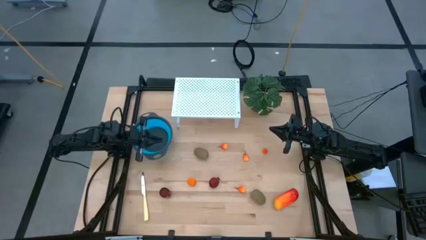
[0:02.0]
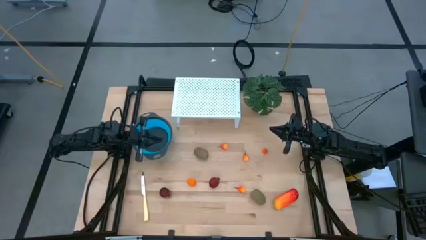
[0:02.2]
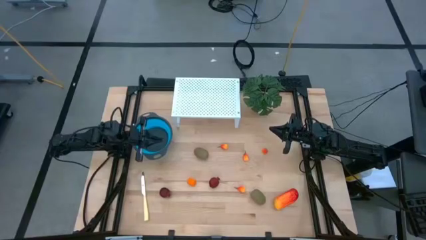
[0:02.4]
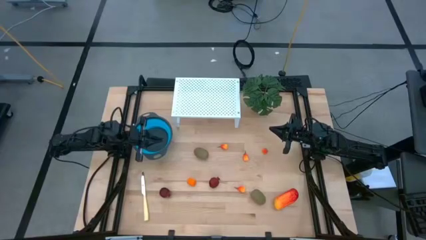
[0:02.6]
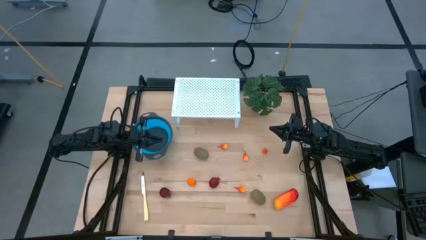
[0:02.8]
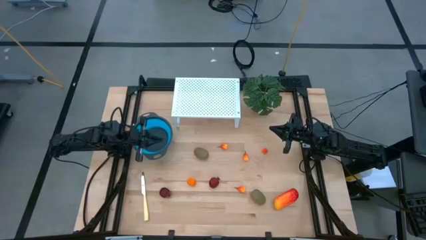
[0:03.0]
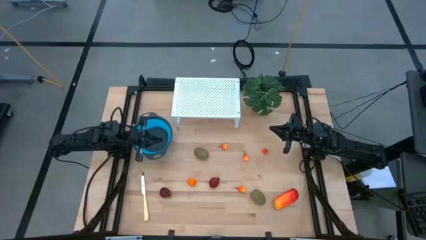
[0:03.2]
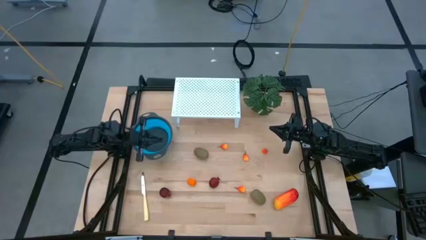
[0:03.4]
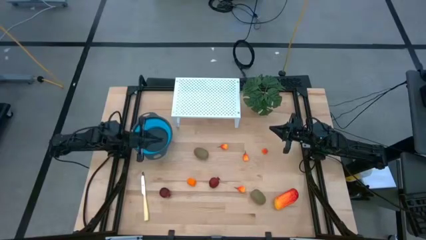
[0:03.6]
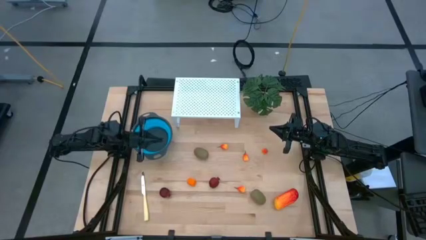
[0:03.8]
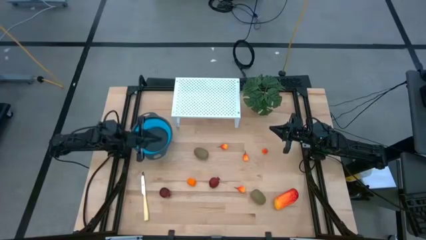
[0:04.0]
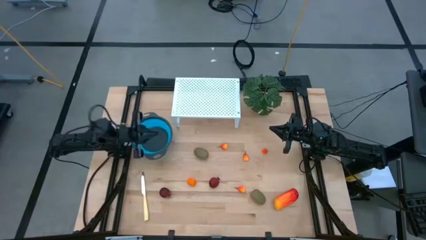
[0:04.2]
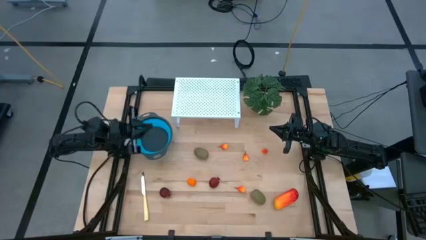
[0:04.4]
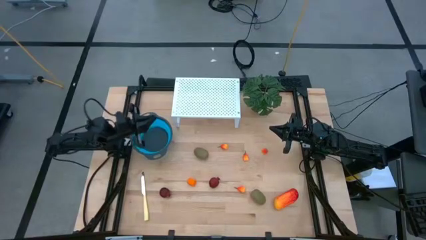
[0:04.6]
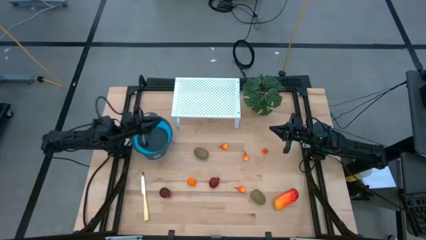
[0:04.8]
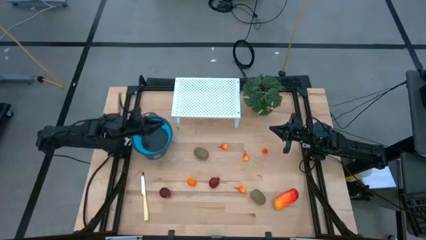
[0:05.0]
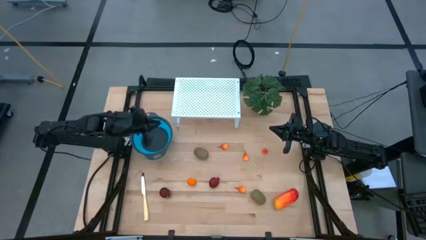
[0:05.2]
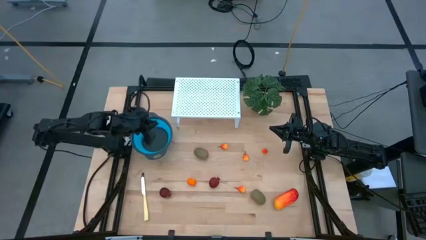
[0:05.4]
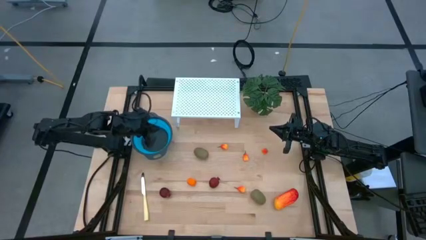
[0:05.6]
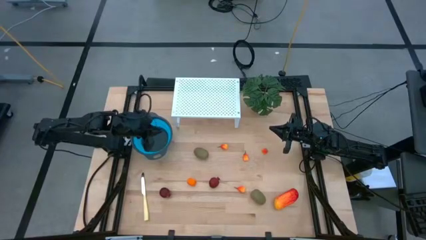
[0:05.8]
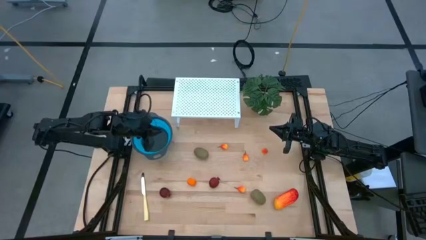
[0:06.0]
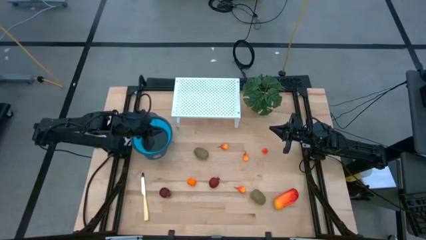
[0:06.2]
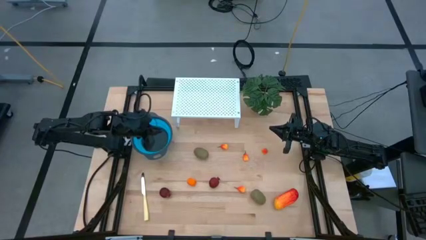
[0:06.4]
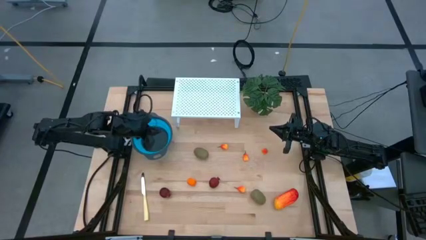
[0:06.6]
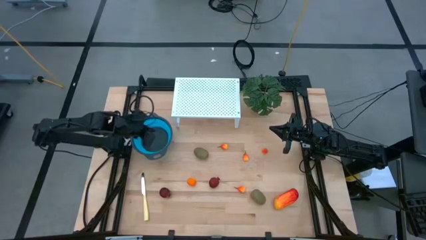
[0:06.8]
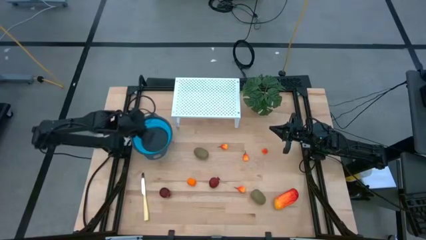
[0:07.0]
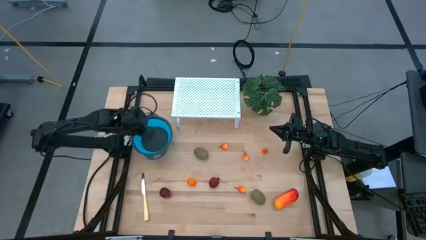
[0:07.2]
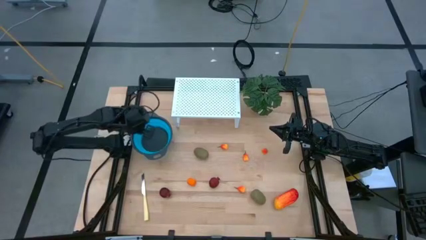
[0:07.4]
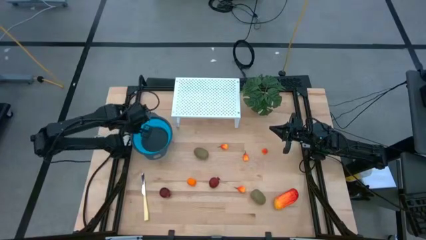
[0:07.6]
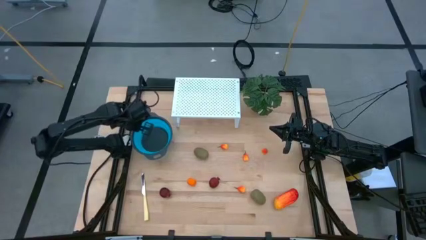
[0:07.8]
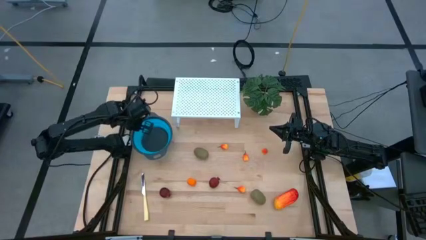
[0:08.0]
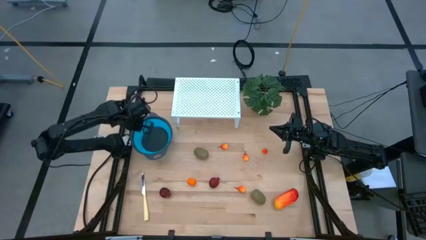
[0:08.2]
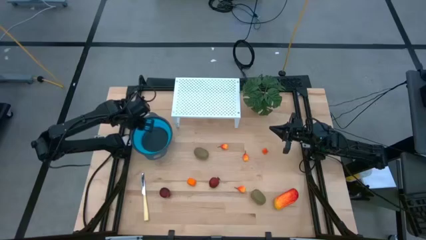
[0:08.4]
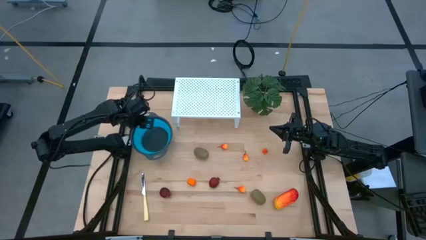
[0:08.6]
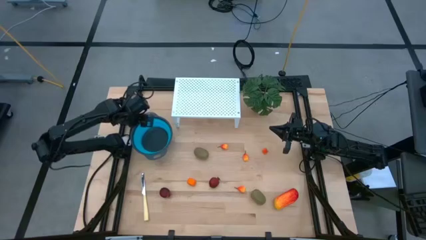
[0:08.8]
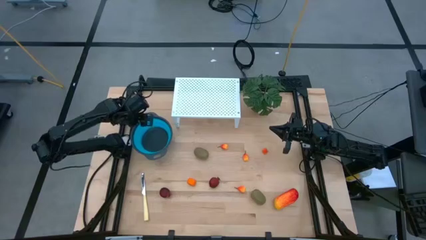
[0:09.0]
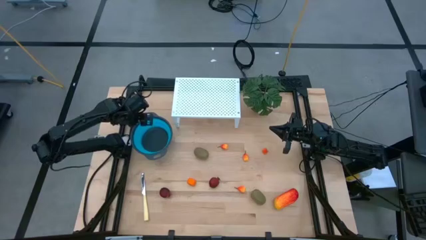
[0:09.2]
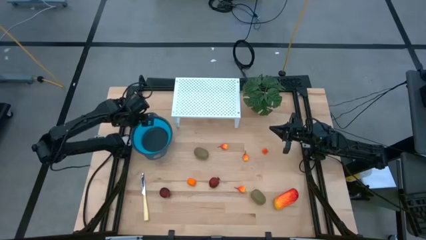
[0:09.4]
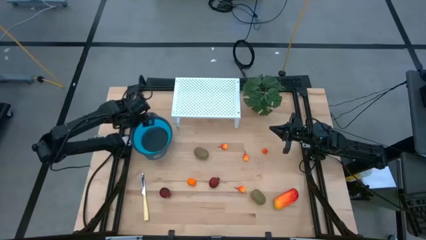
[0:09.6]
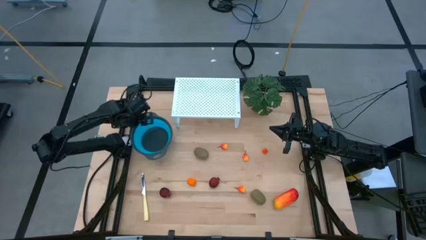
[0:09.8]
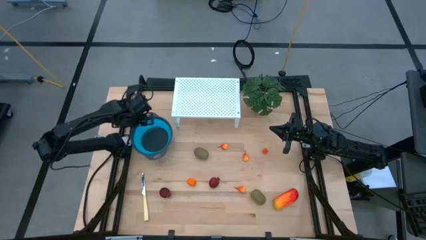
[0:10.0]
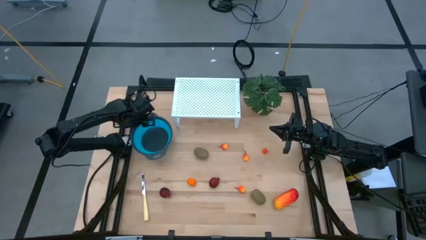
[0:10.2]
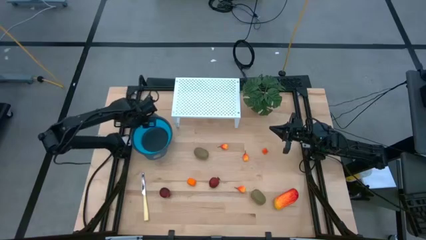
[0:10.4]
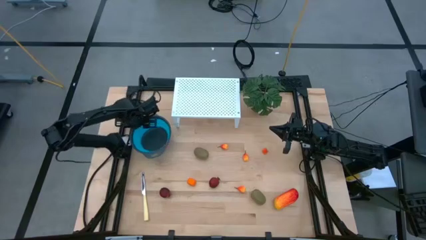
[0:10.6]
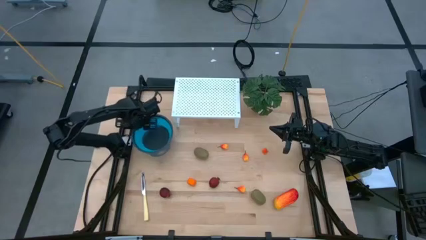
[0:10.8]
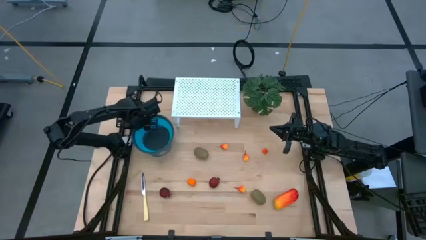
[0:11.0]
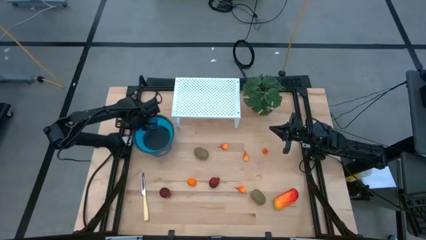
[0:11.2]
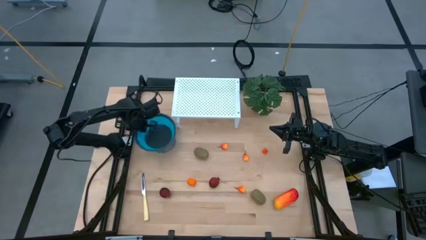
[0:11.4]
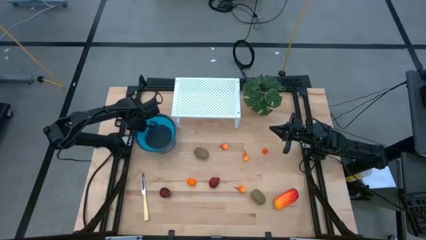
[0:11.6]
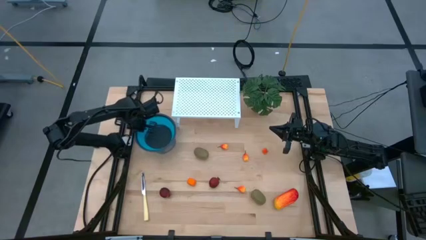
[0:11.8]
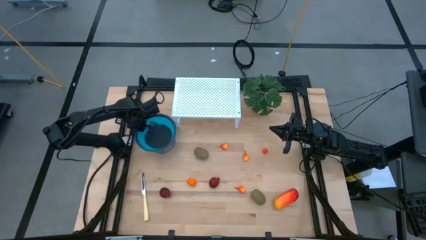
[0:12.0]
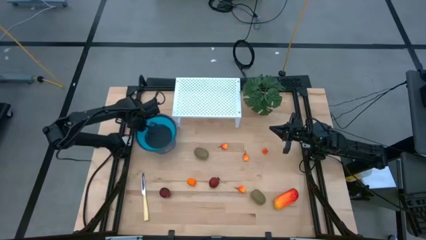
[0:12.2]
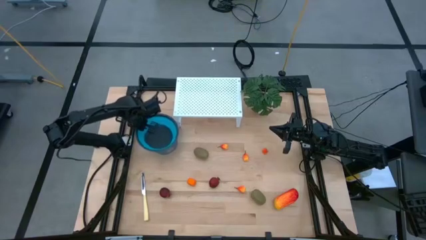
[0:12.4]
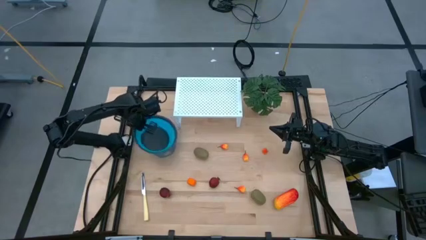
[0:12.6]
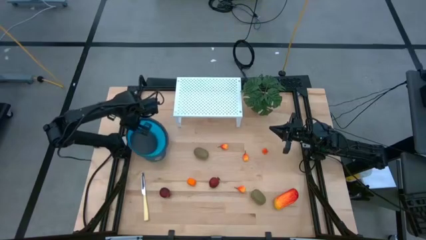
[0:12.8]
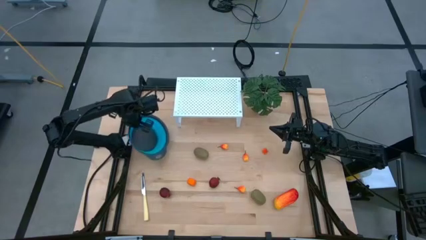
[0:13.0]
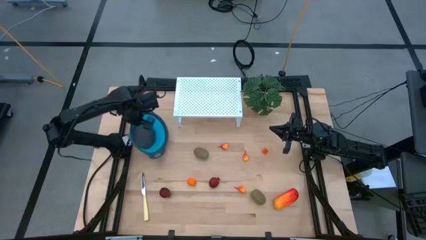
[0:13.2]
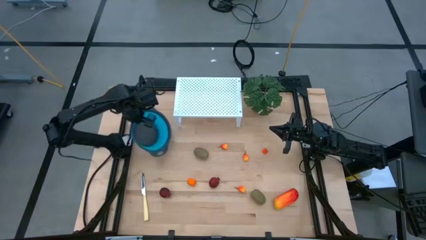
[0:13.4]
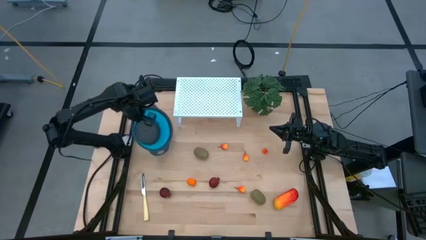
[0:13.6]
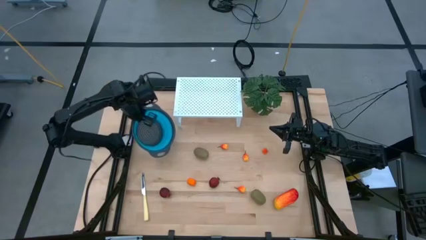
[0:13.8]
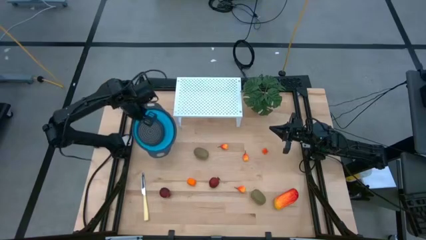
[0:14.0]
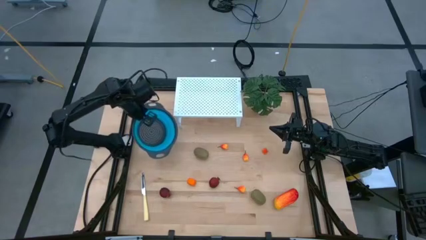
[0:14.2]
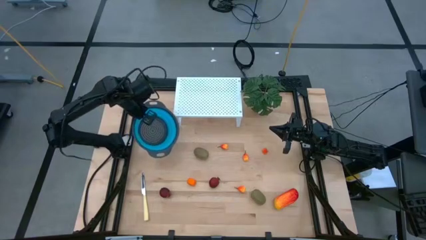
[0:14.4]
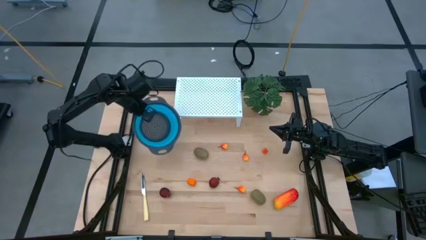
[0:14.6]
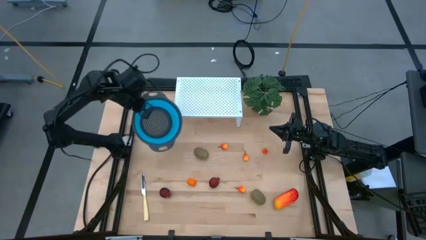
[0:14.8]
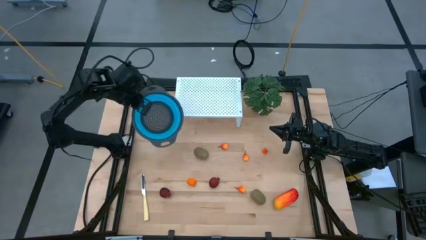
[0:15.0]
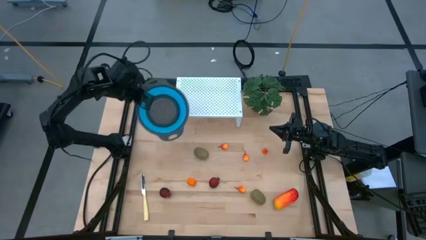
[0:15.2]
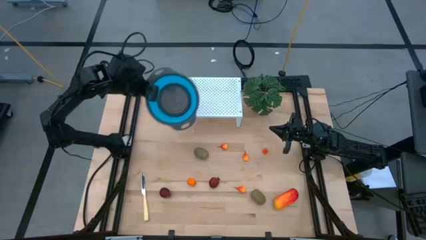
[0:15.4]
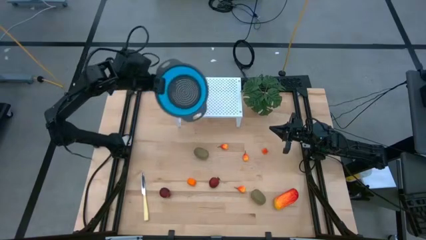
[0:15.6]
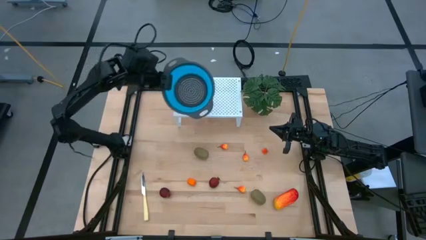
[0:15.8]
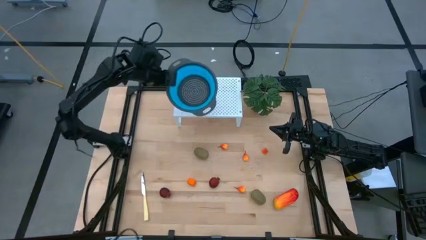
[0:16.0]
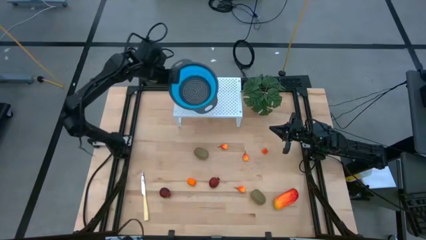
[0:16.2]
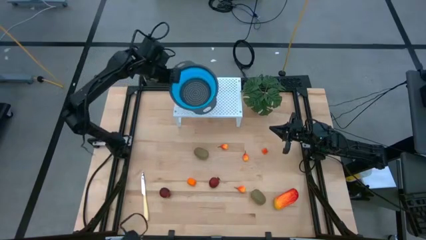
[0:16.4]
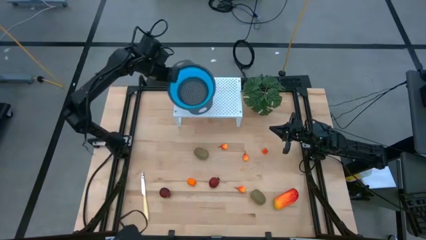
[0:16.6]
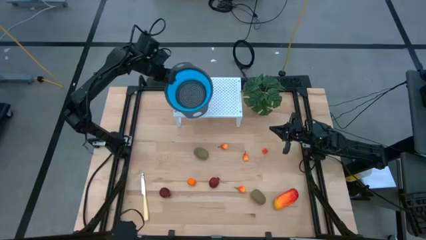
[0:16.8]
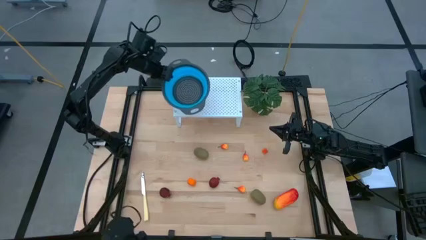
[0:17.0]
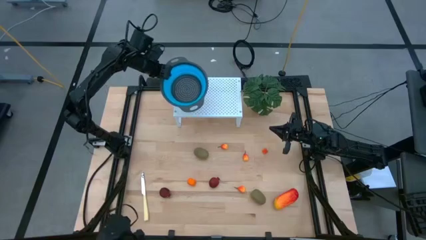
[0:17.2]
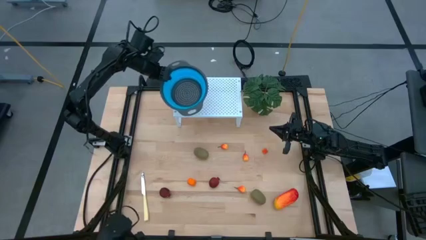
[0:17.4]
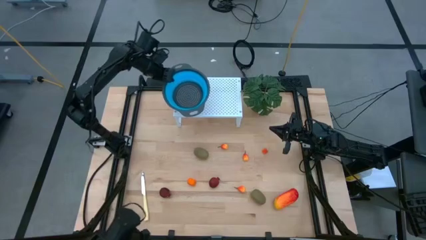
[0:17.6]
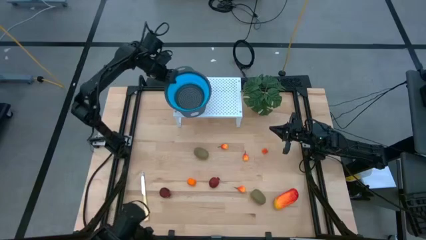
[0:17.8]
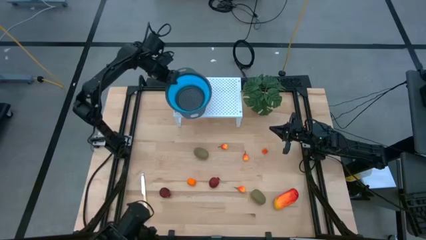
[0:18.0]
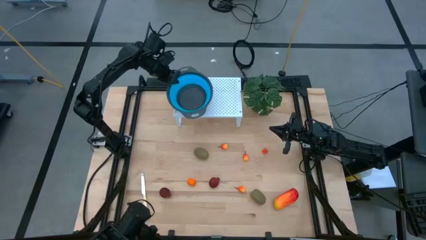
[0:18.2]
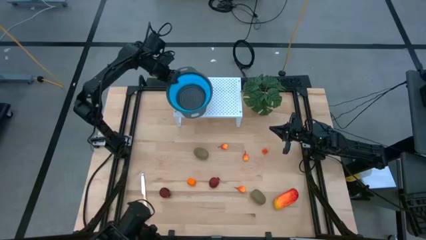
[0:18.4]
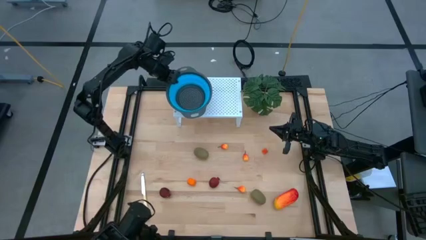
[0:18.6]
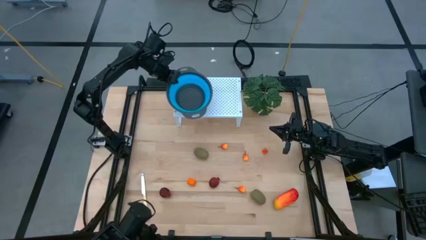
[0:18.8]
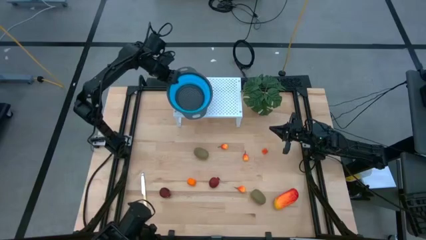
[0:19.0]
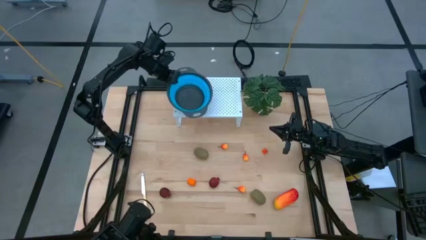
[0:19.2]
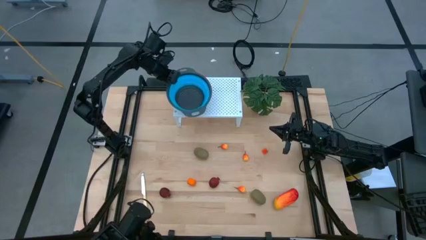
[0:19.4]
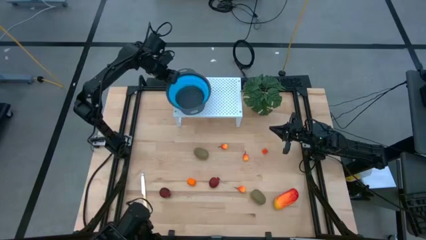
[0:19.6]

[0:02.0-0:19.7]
Task: Pick & Place Fruit
Put the blue strainer bowl on the shelf
